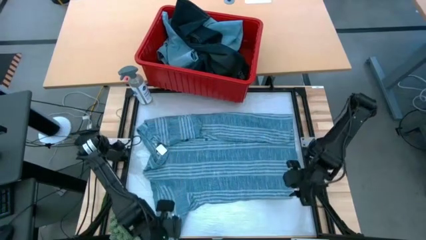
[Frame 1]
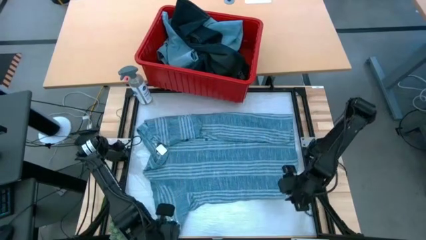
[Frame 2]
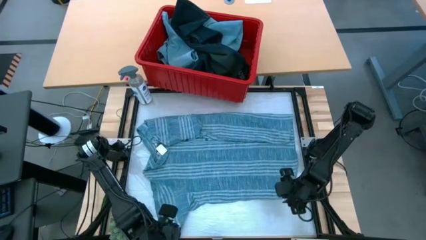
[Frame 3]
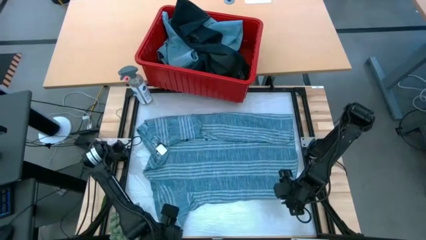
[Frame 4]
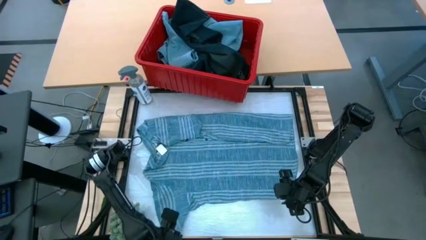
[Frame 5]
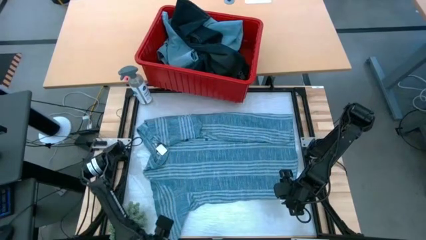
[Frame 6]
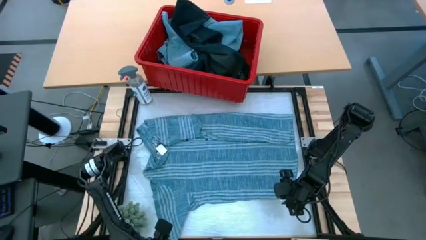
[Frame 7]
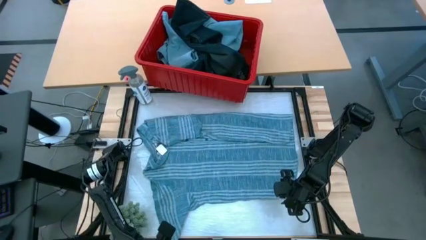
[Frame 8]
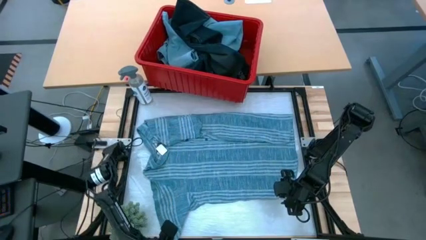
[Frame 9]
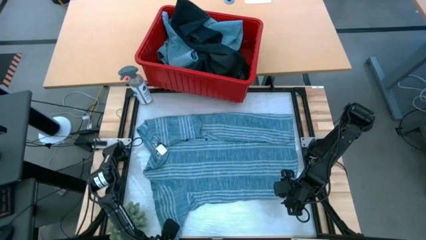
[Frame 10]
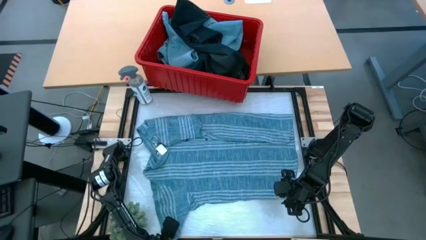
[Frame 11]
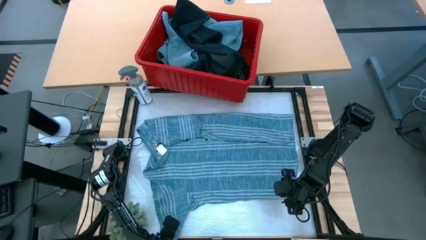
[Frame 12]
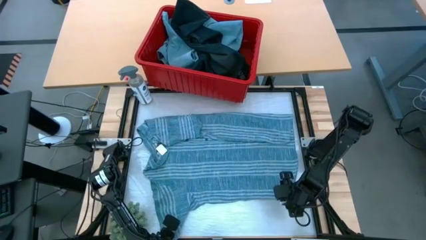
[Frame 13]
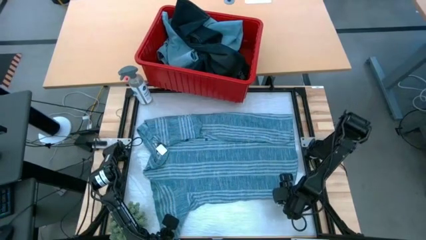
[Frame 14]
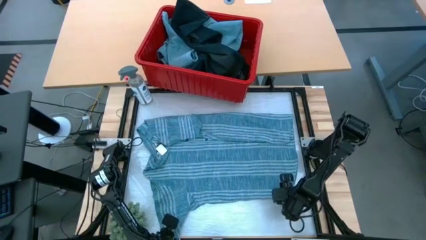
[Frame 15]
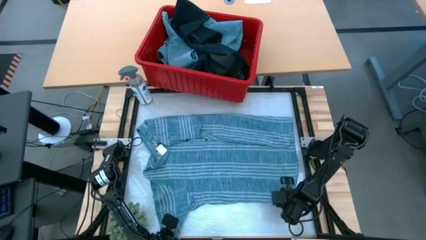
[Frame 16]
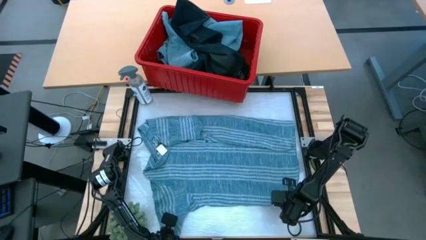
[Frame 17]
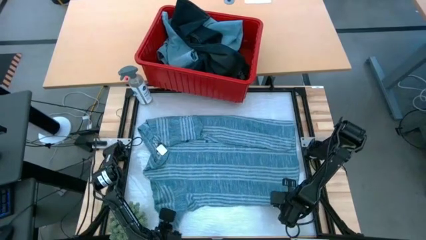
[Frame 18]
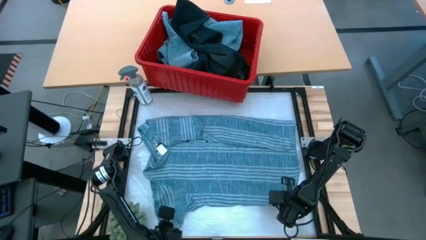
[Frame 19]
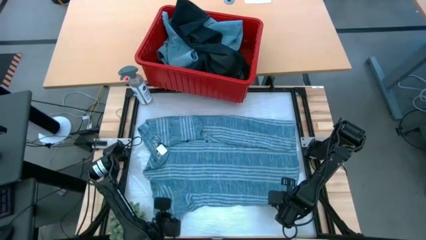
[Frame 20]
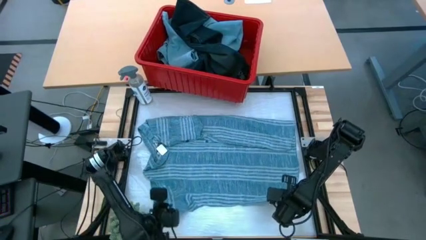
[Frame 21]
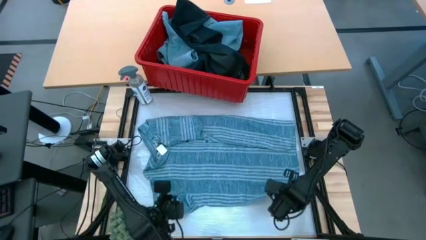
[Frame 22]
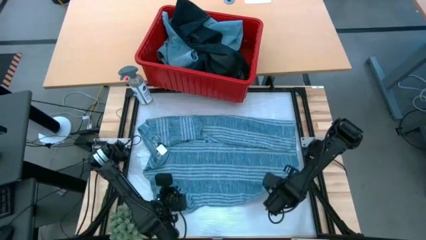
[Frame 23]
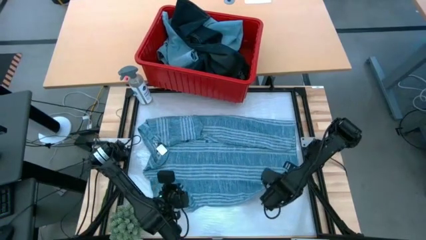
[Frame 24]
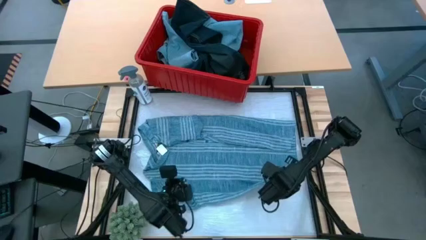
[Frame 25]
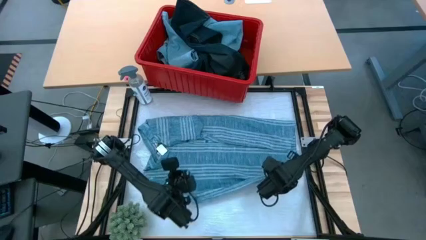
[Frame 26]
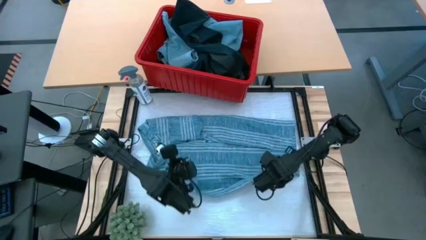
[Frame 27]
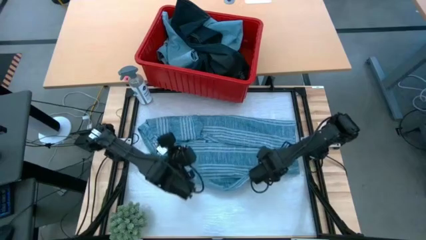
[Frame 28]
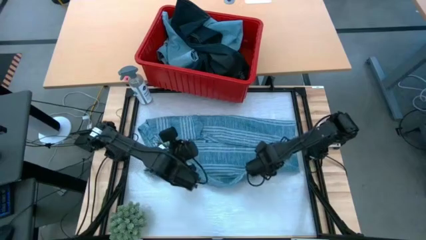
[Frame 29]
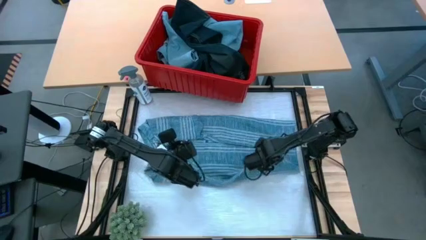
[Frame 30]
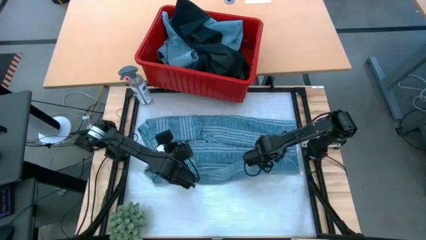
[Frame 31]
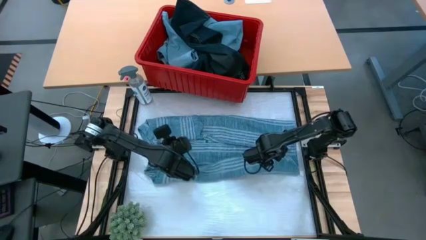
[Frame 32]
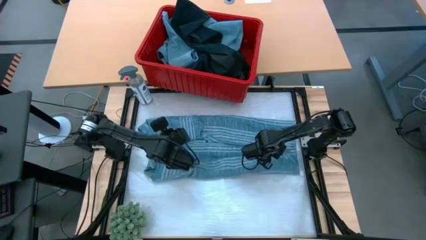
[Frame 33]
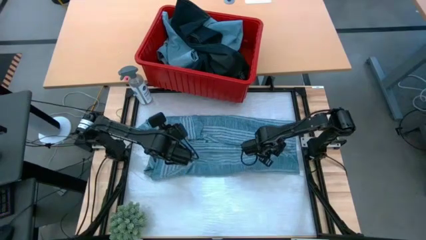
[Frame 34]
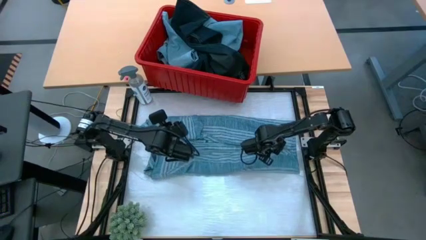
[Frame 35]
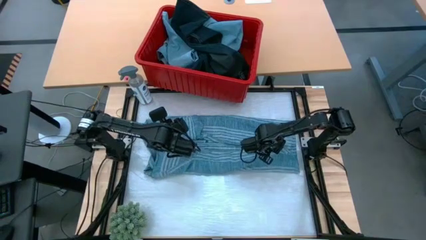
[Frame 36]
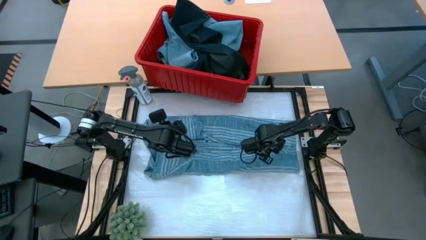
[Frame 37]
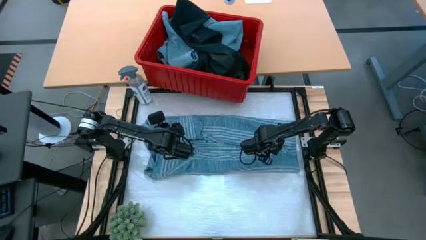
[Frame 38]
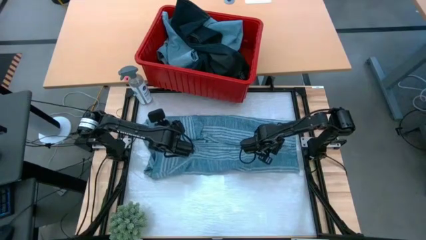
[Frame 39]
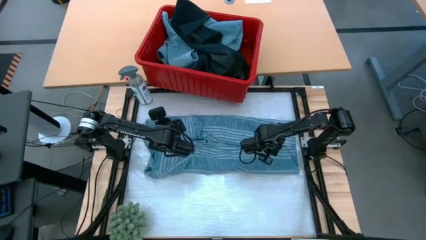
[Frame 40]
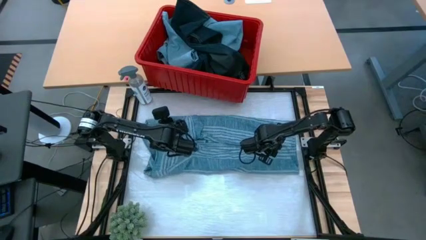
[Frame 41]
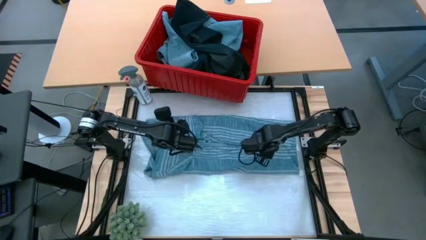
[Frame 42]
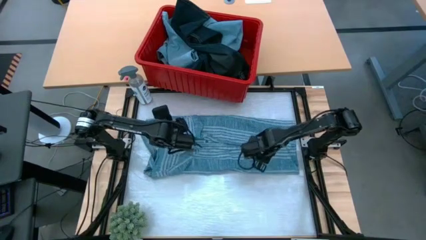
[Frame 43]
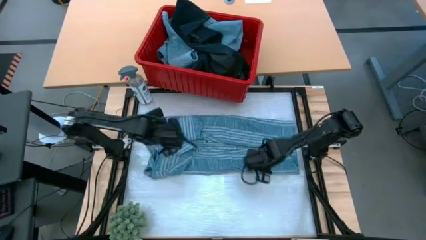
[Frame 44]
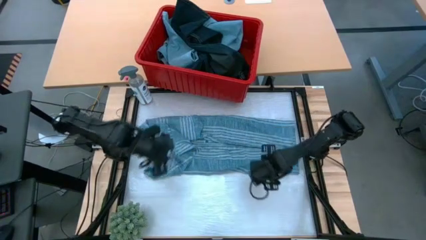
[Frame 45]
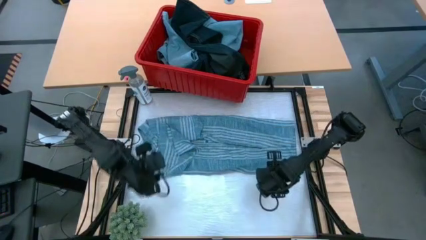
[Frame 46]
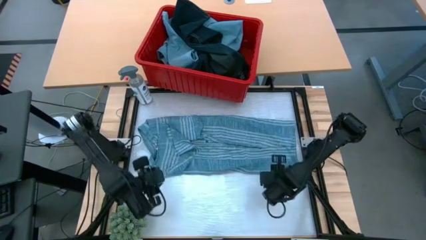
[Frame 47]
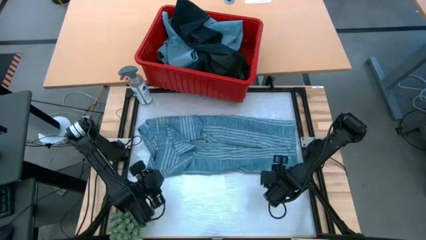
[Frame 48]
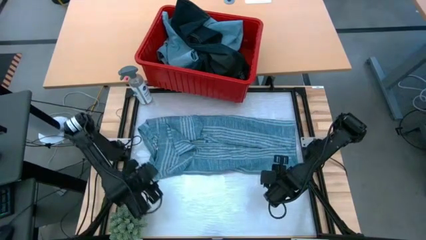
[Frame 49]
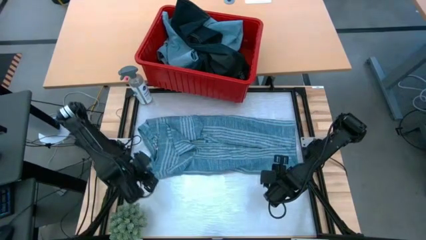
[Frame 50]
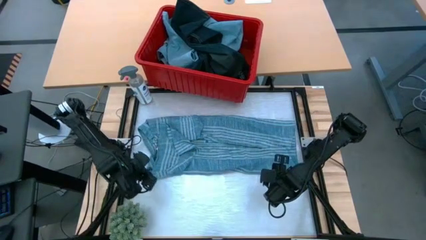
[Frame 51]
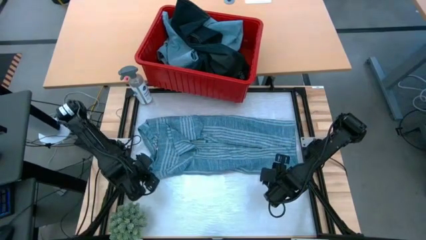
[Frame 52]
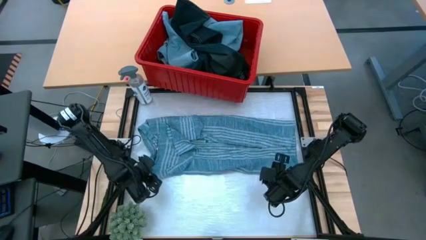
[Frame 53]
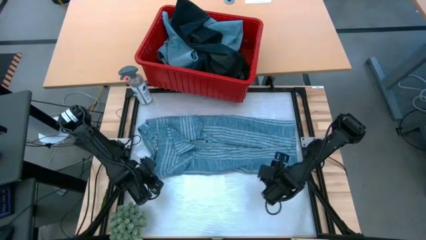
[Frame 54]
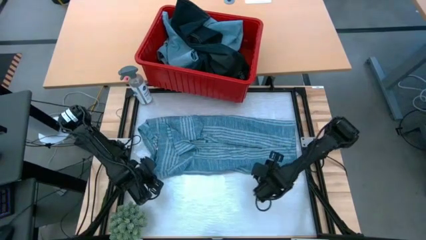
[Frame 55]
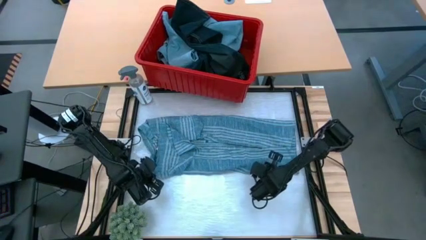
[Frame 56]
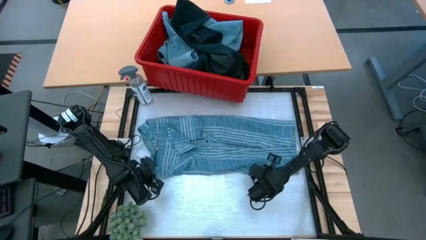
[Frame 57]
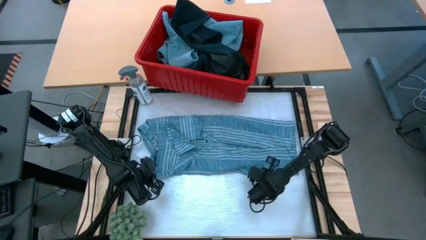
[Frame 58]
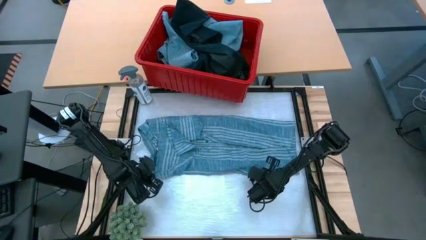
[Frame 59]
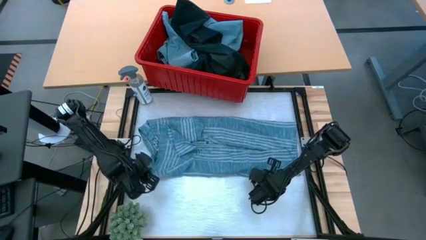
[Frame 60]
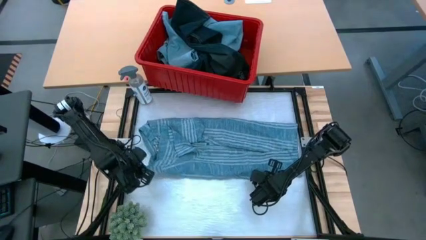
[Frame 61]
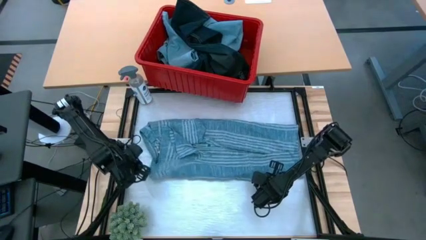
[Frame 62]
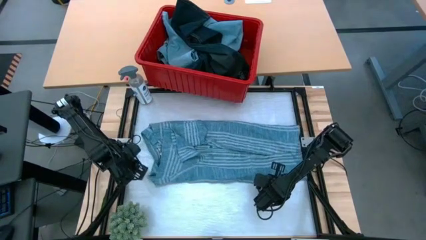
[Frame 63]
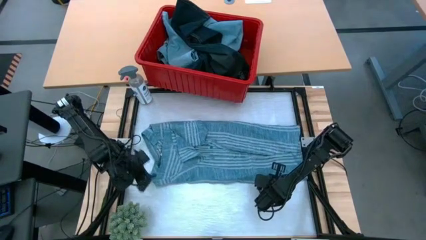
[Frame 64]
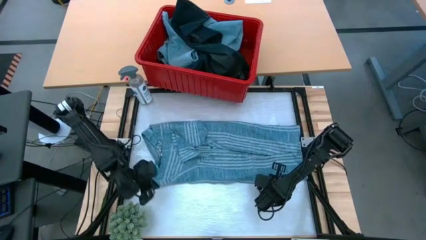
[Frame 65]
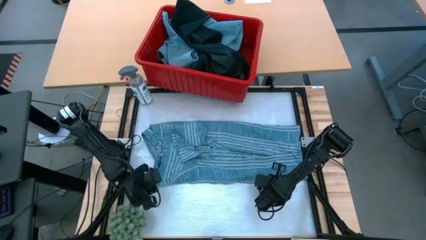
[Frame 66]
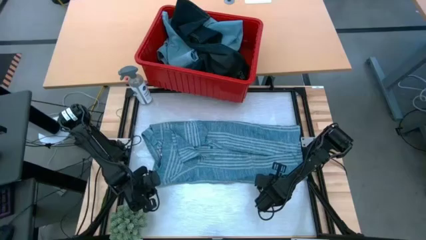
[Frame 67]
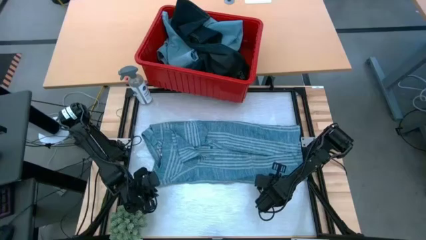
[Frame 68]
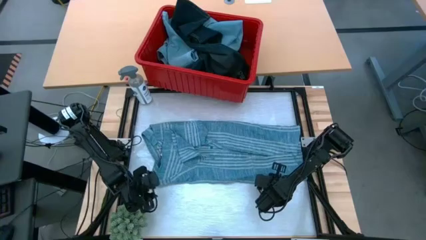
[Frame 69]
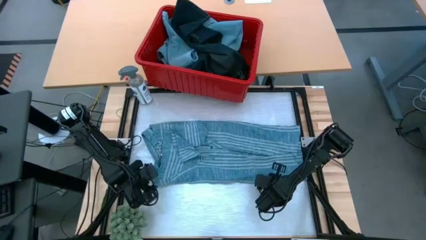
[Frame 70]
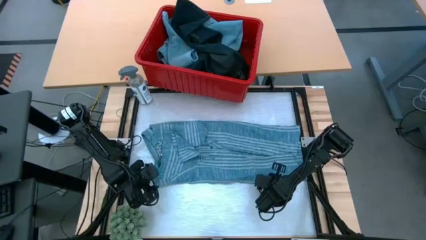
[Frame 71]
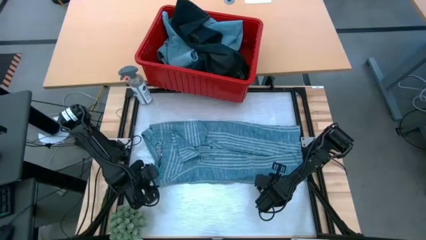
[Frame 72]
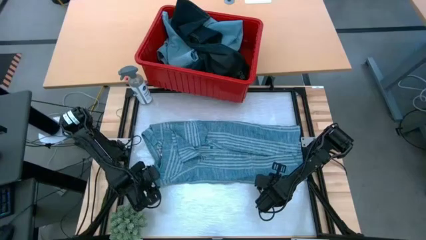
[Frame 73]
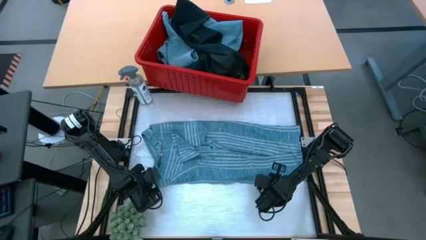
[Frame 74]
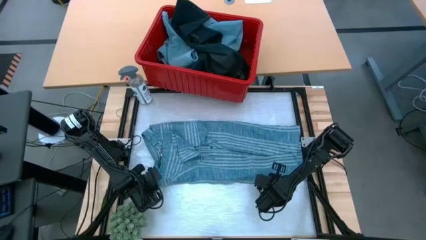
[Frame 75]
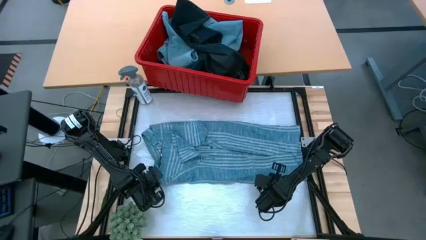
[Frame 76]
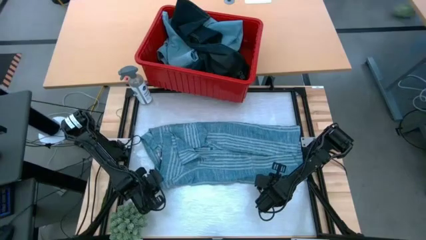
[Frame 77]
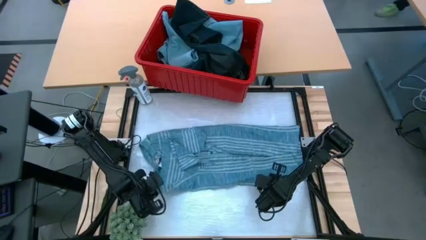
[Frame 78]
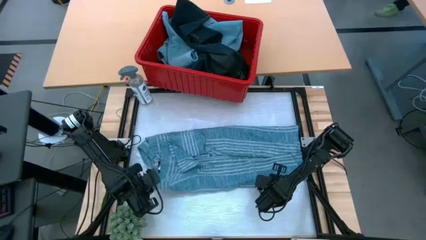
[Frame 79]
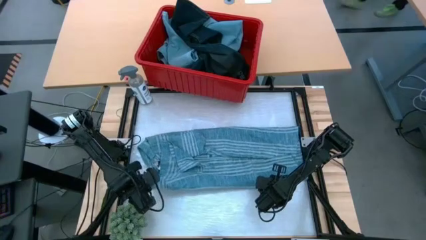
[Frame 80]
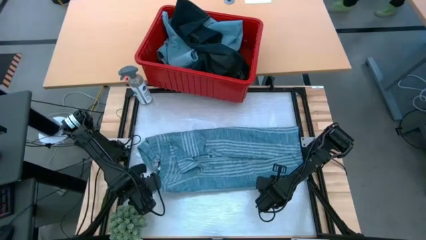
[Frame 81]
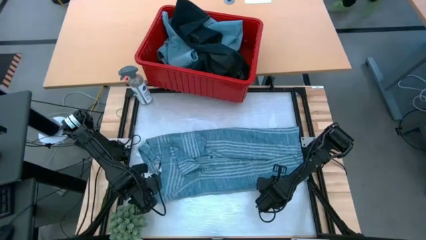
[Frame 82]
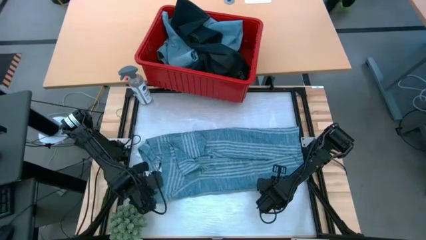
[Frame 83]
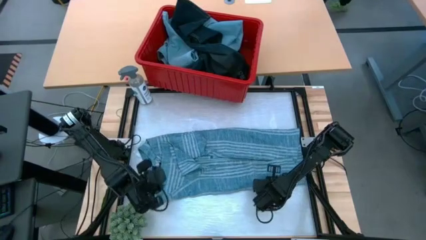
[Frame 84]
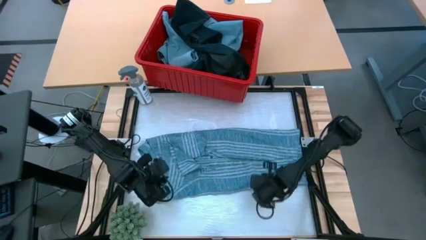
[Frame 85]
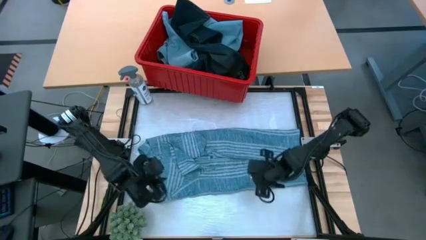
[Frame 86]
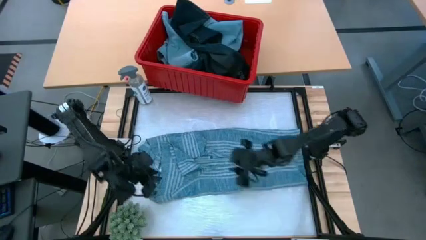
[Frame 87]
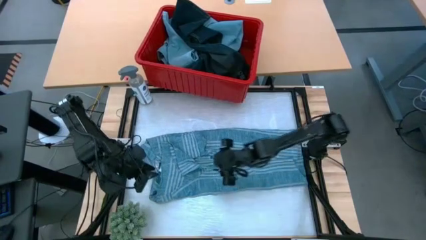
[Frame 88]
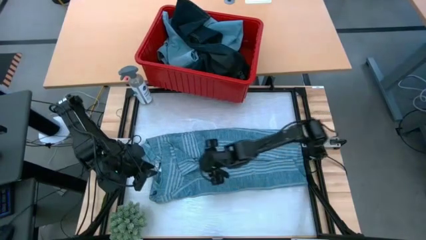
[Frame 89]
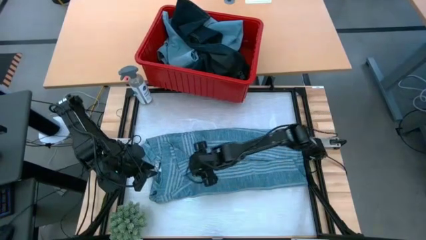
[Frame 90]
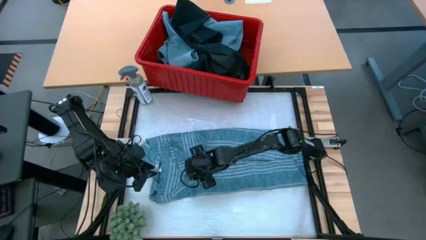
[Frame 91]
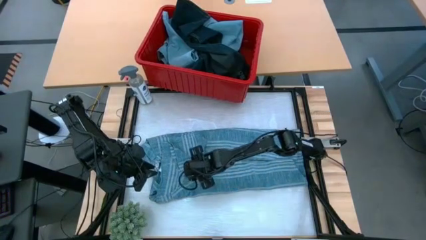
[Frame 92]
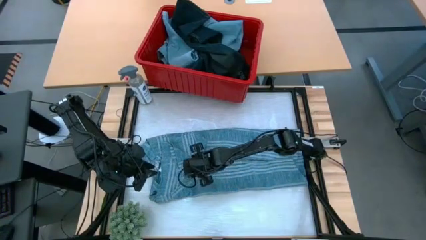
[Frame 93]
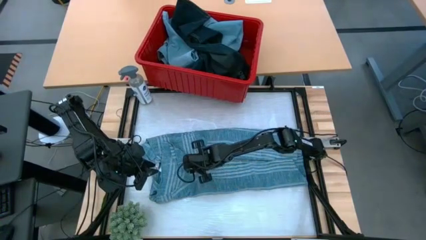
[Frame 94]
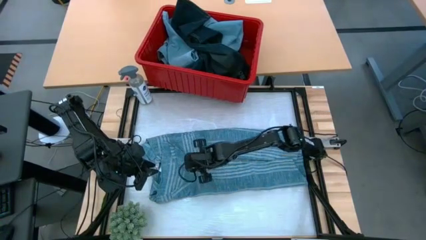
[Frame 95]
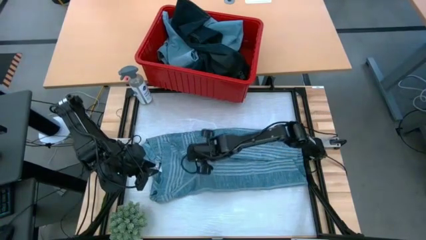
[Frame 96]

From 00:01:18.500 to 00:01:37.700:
Task: Fold Laundry from Bin
Fold the light blue shirt
